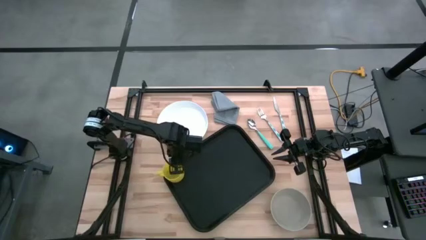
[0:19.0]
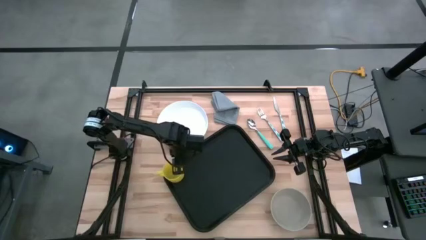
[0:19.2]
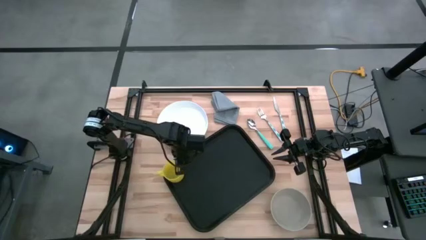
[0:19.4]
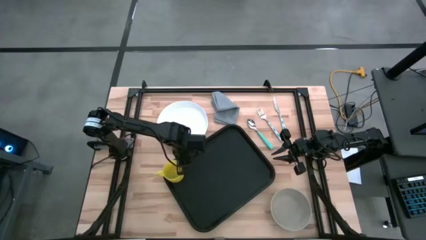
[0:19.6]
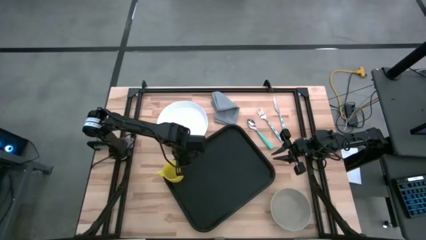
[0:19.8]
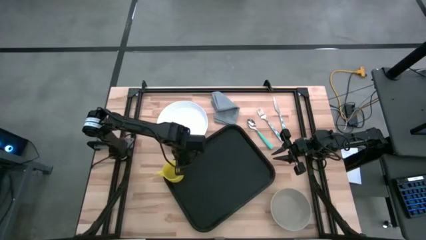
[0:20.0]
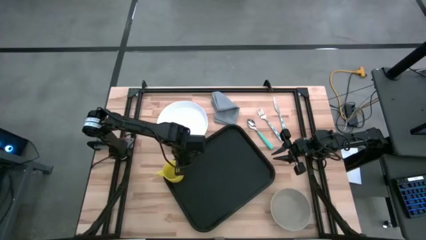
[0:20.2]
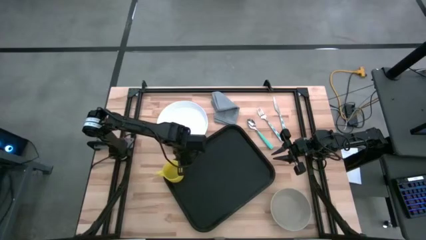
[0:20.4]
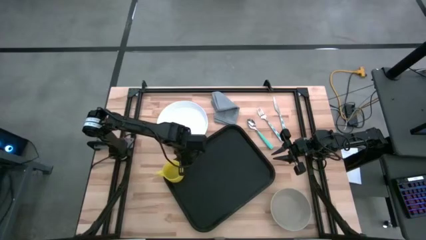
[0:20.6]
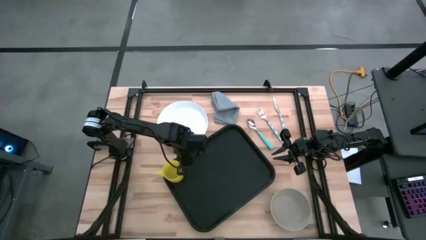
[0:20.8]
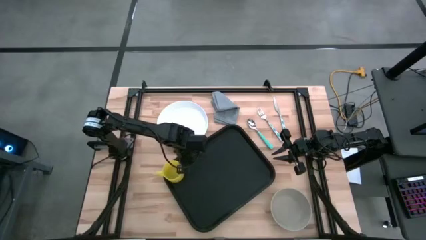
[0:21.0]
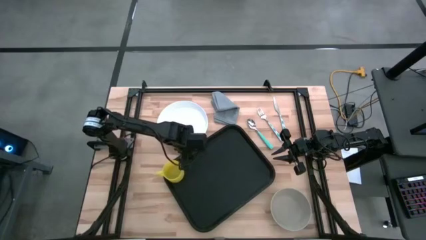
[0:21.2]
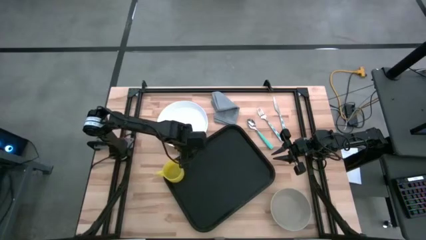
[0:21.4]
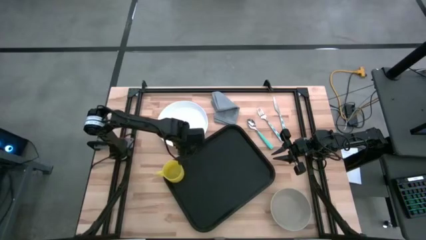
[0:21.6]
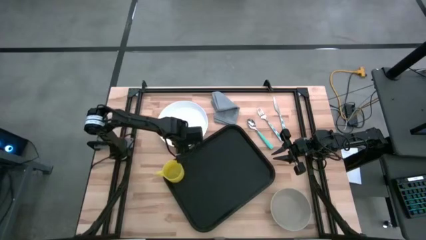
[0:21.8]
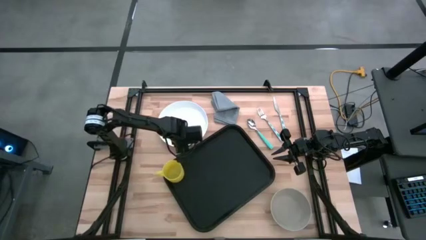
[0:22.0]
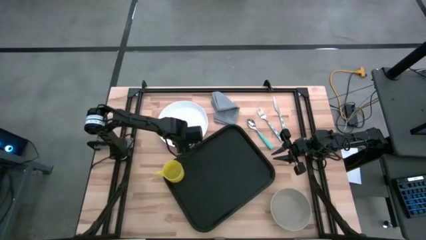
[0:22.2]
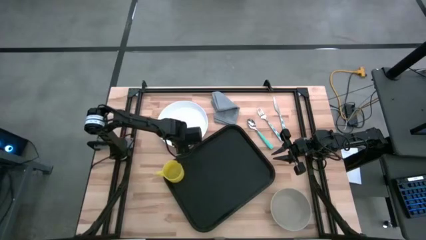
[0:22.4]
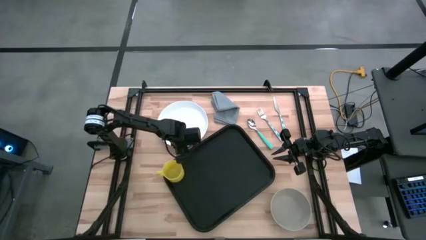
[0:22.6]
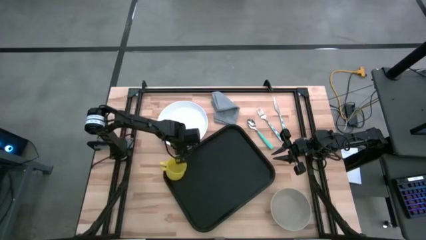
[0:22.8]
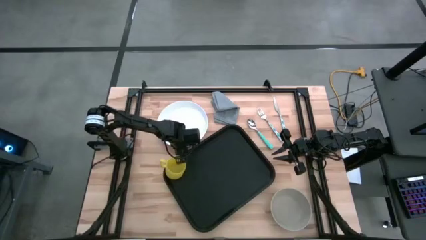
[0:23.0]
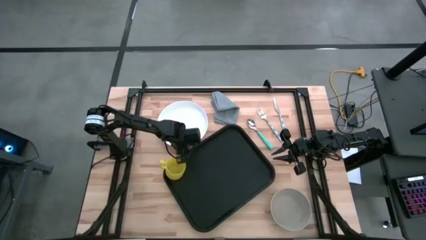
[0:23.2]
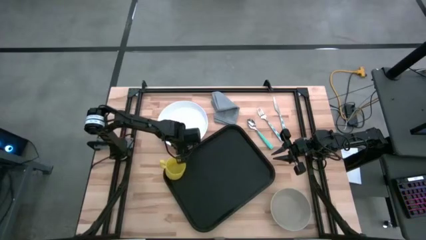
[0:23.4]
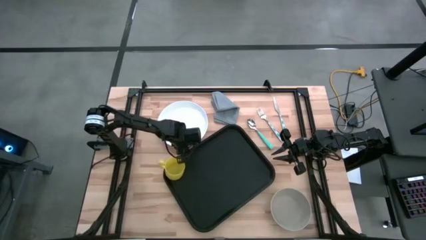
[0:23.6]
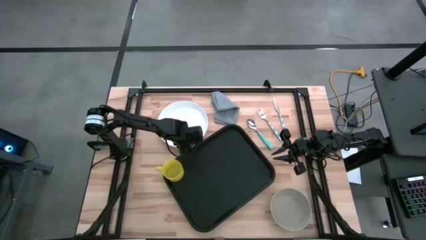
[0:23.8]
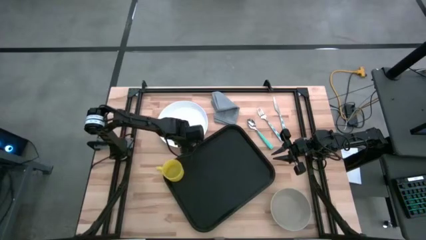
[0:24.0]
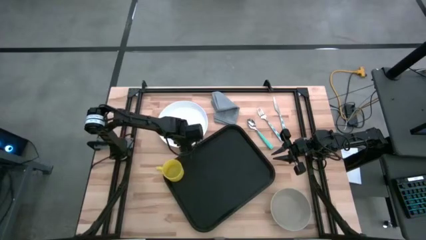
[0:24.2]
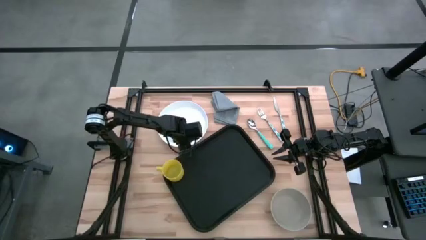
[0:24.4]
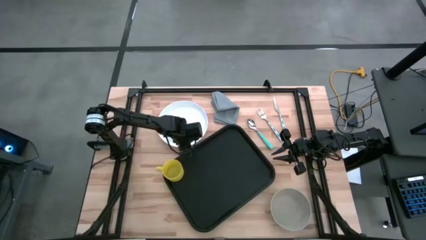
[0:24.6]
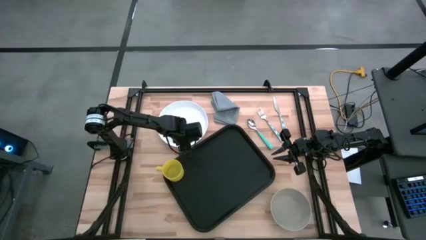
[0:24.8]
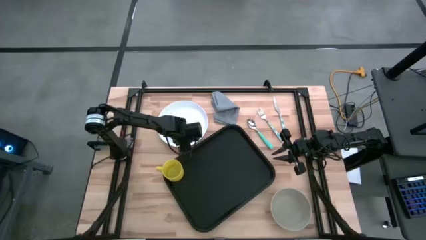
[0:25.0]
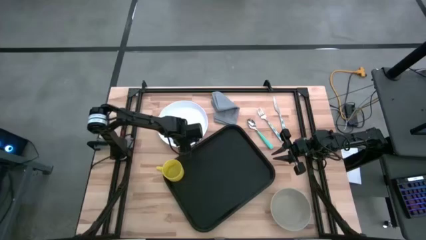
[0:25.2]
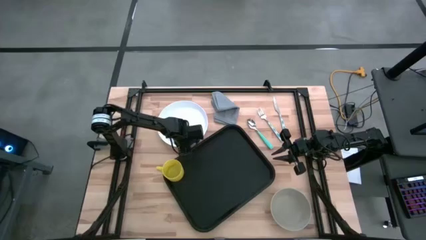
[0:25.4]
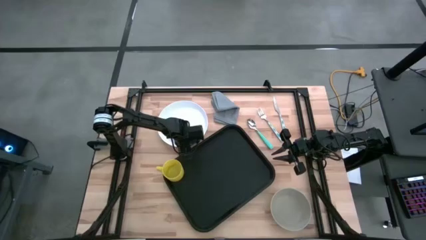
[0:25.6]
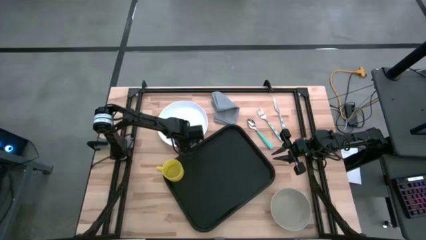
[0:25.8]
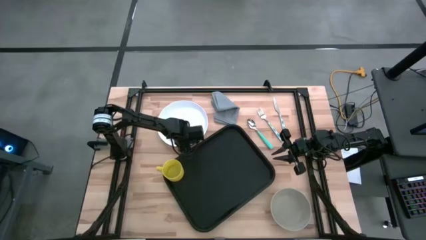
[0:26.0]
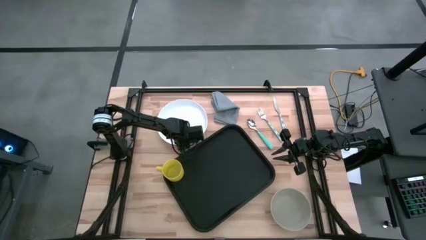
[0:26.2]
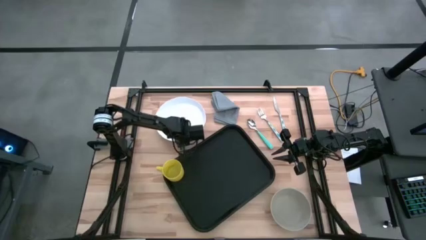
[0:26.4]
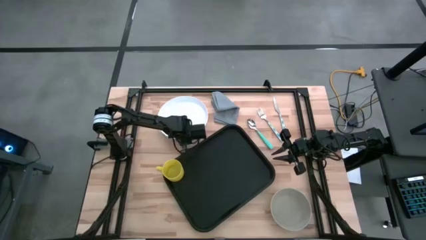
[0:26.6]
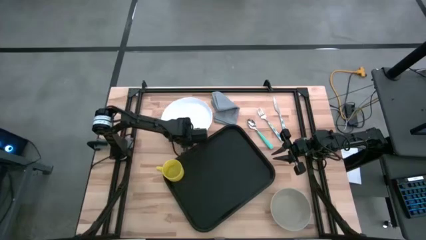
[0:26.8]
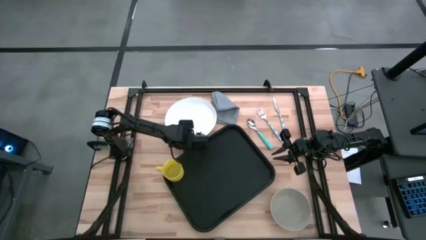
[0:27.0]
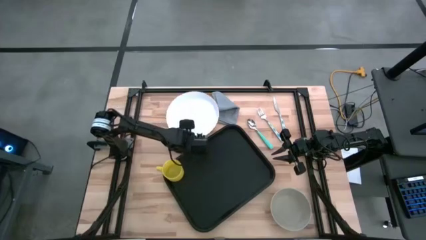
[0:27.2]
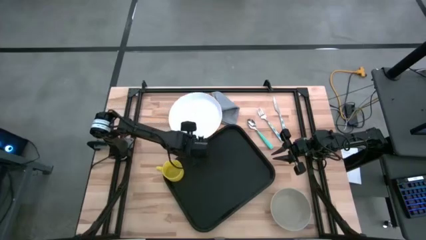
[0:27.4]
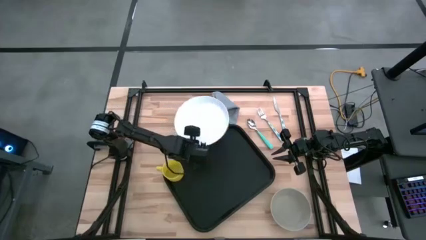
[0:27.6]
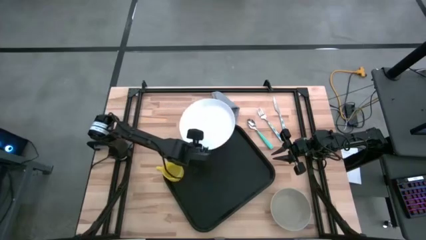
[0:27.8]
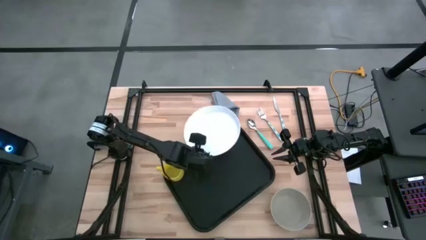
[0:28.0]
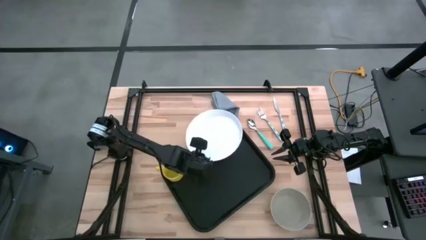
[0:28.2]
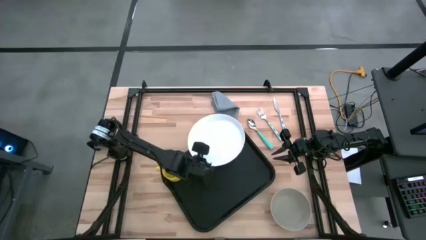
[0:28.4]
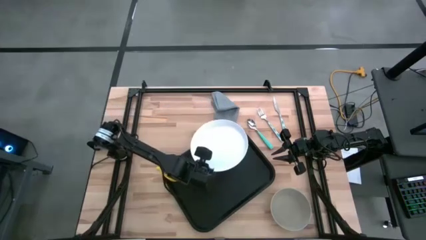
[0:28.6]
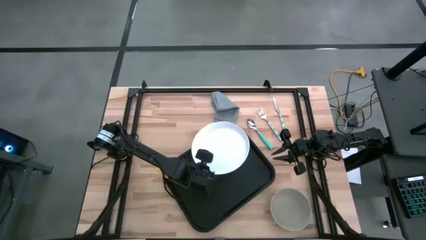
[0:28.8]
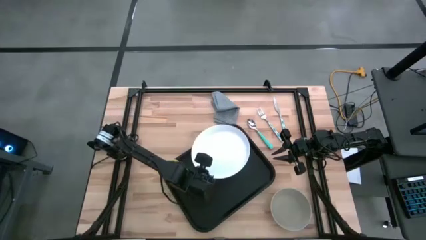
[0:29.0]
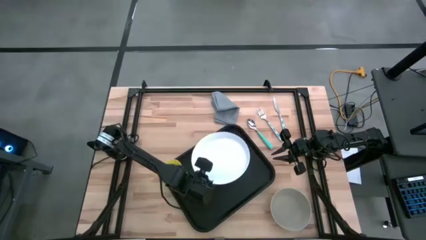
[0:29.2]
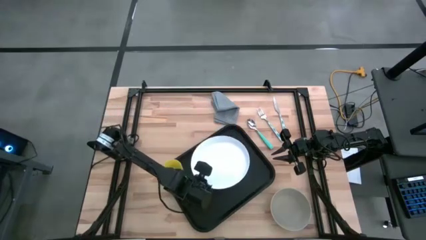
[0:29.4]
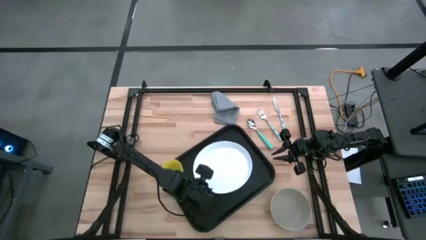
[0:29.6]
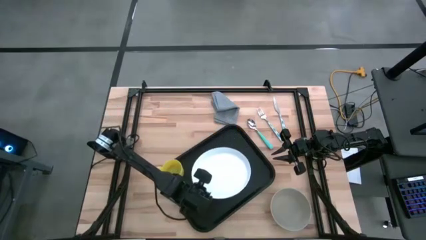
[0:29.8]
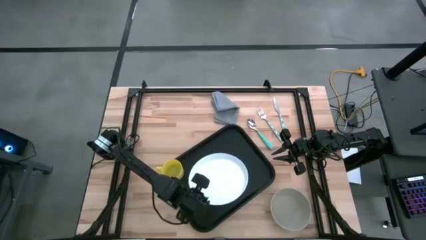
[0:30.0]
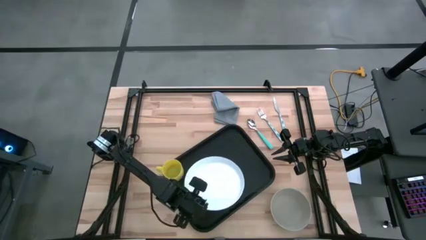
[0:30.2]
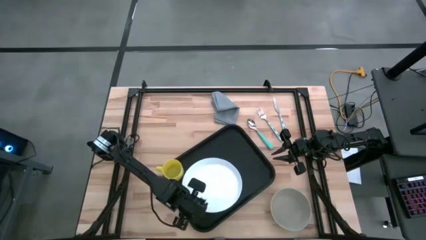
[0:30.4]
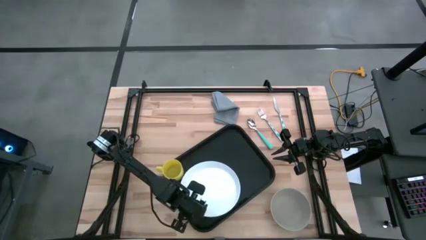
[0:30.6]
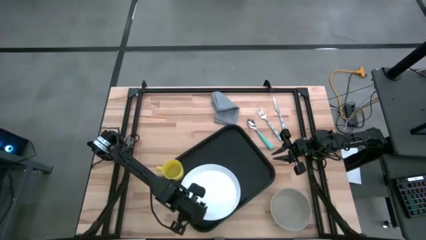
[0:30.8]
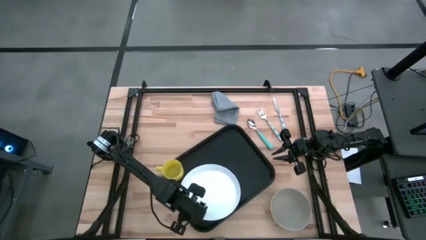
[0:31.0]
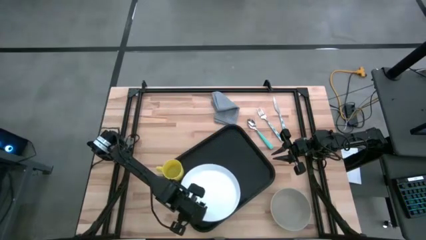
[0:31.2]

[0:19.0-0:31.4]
Task: Set up tray
Put the white plate on the black tray below the yellow mug

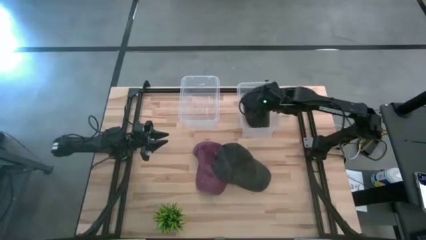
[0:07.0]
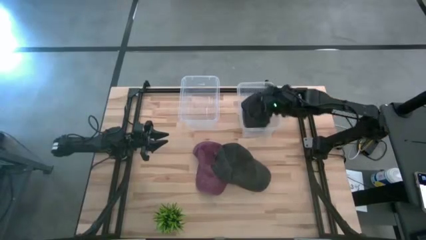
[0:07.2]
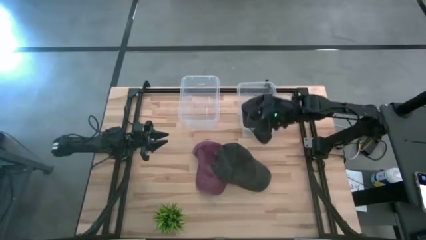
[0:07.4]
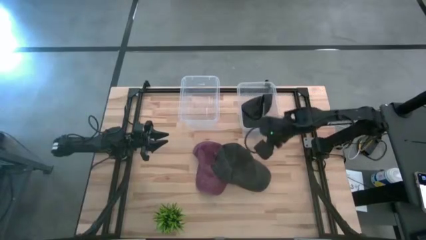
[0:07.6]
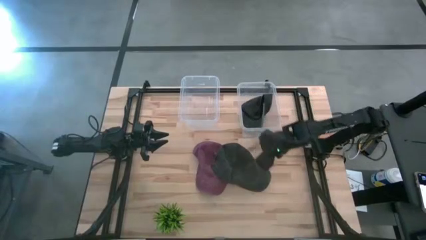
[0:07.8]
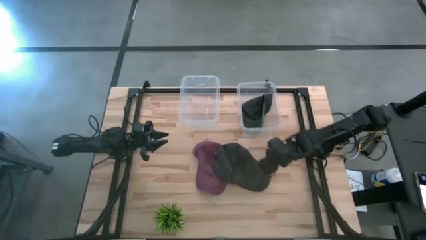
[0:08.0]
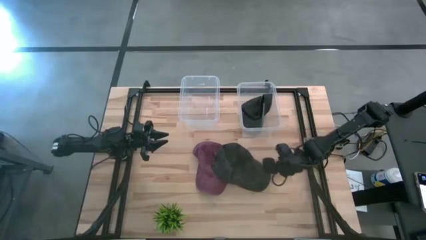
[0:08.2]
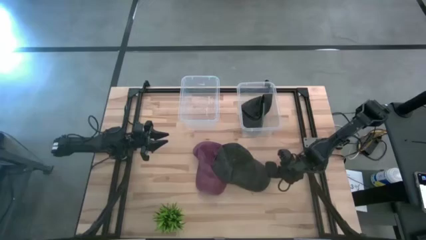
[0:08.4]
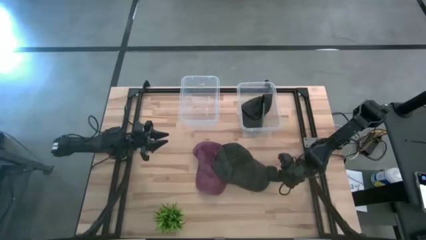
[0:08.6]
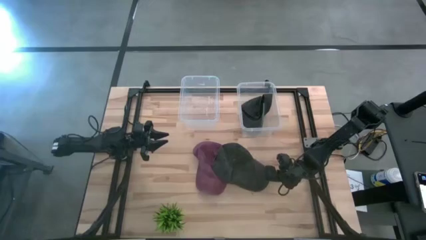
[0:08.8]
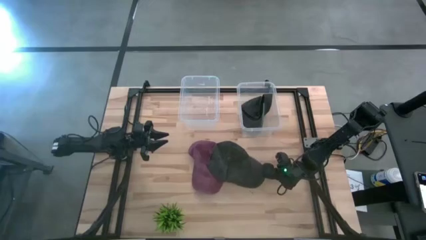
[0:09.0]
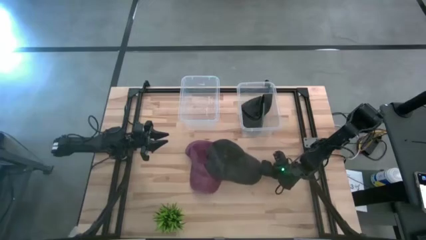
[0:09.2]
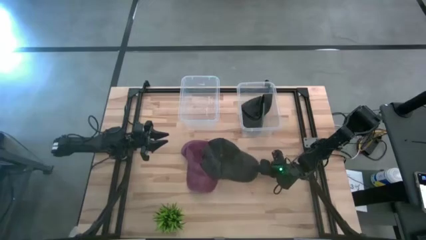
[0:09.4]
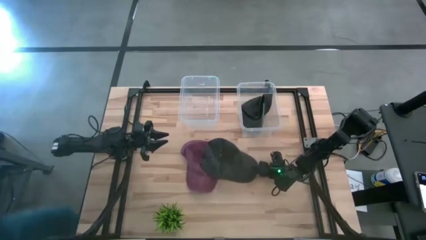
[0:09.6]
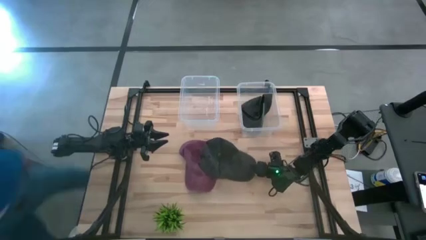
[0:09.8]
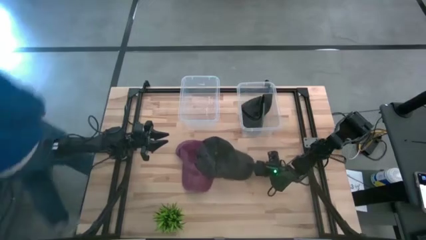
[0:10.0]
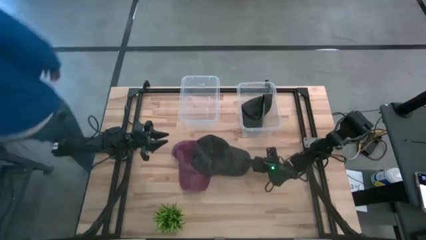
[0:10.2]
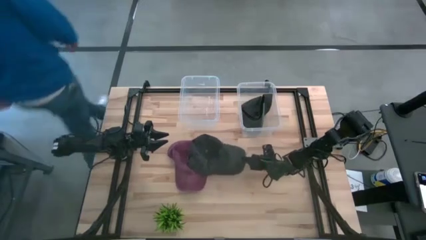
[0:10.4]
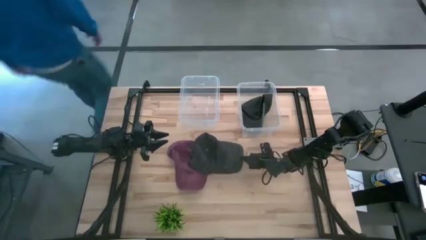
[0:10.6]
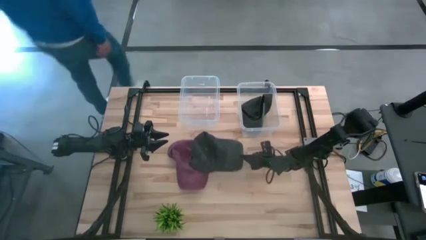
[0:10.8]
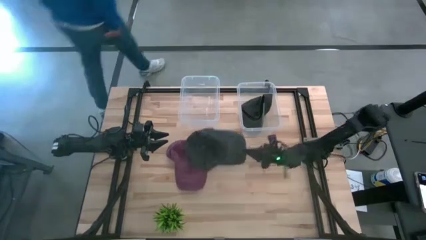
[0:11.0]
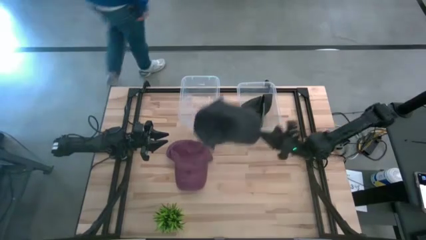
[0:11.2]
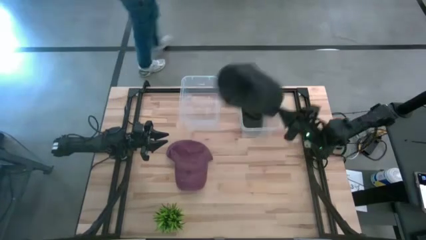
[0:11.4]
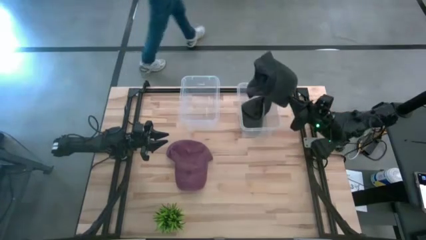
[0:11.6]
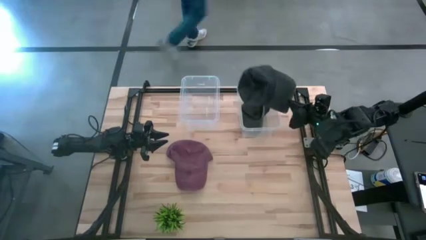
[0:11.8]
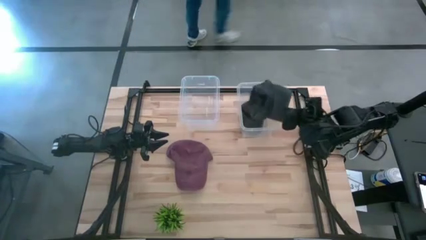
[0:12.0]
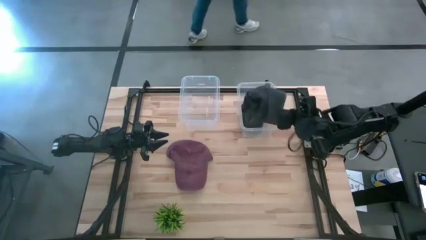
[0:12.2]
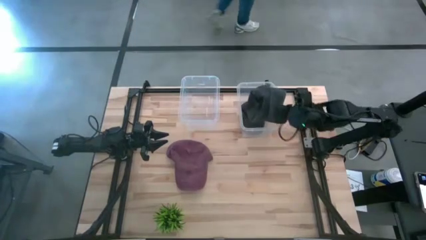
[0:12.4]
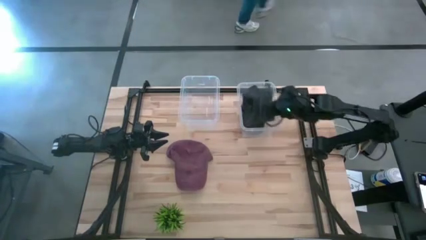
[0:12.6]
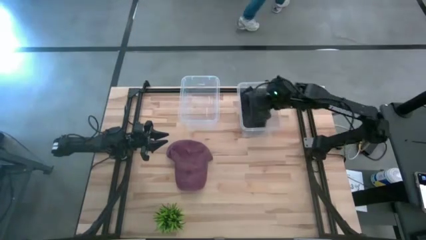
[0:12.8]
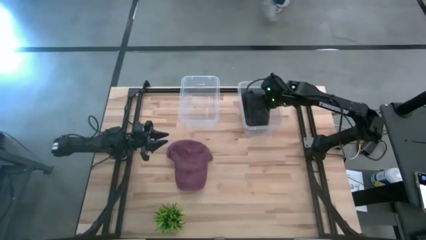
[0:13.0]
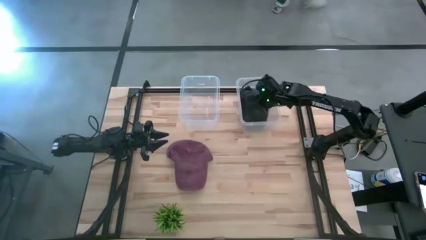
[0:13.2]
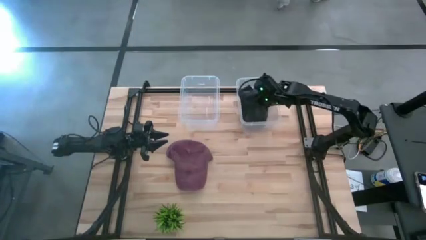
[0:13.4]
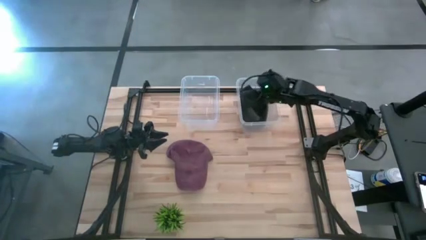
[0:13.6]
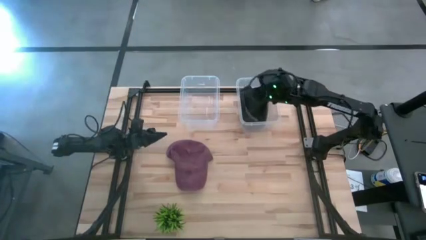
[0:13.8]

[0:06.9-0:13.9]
Task: Pick & Place hat
Put the black cap into the right transparent bin
